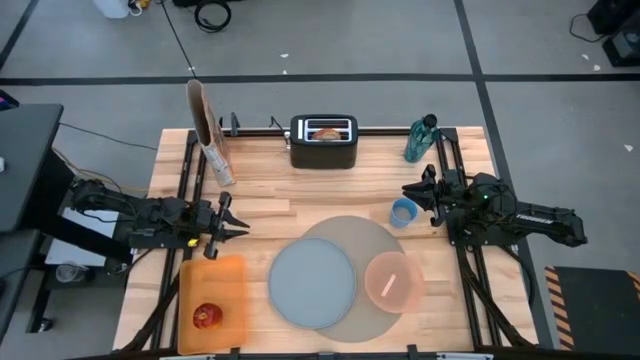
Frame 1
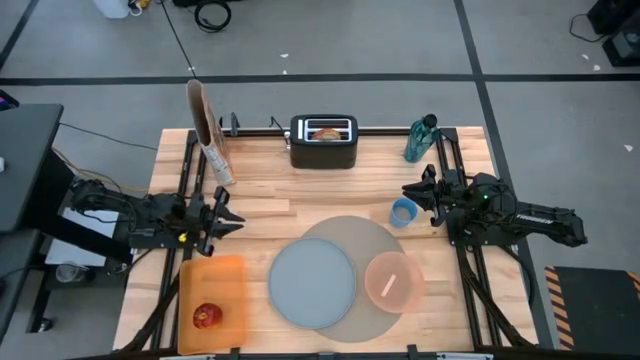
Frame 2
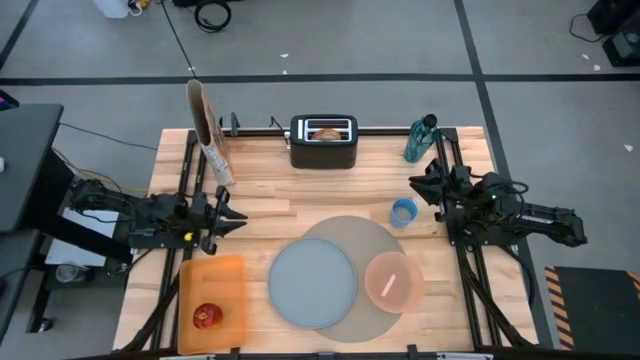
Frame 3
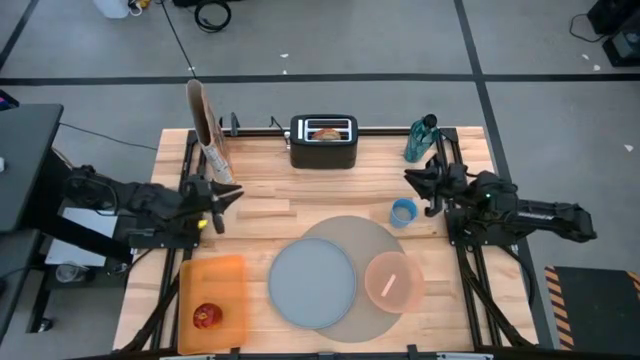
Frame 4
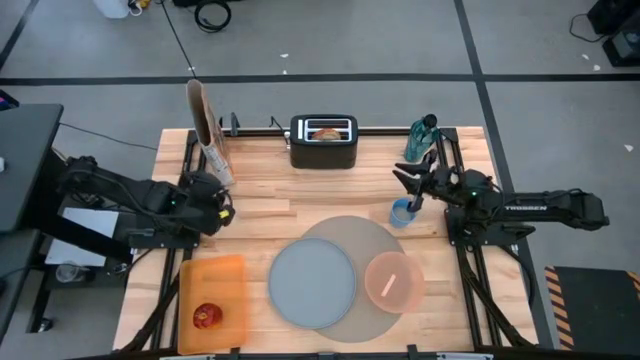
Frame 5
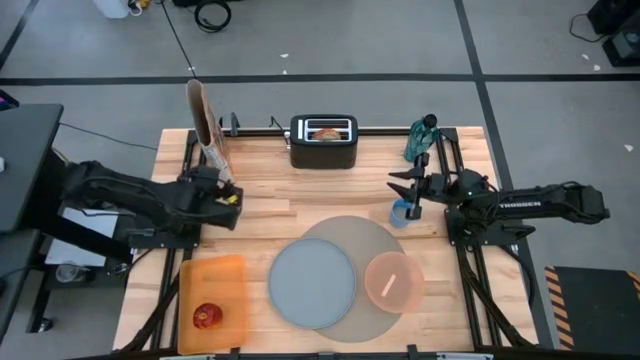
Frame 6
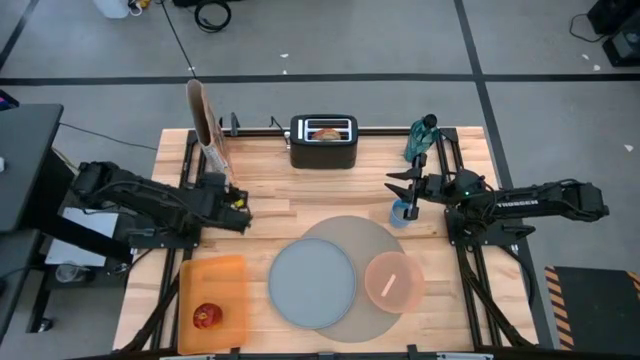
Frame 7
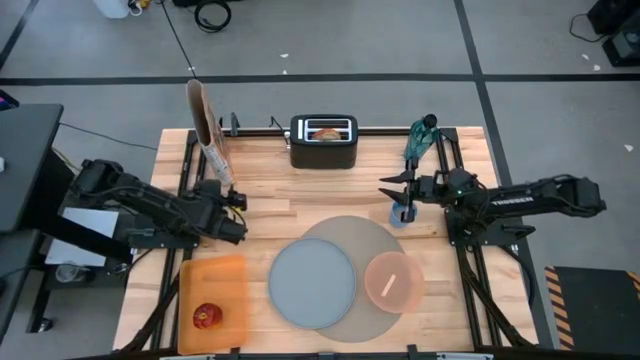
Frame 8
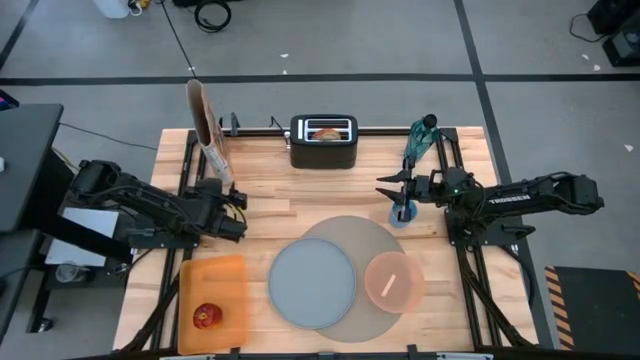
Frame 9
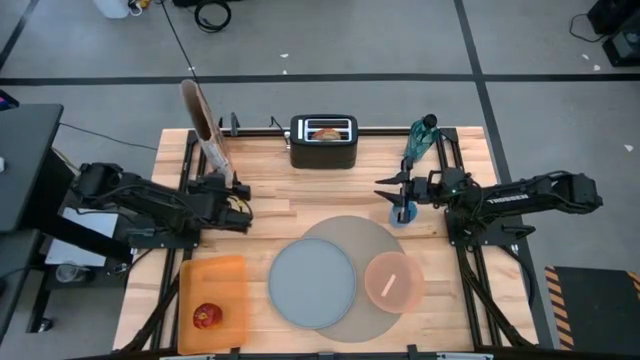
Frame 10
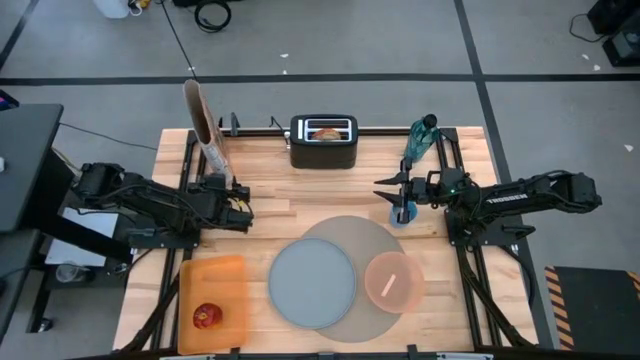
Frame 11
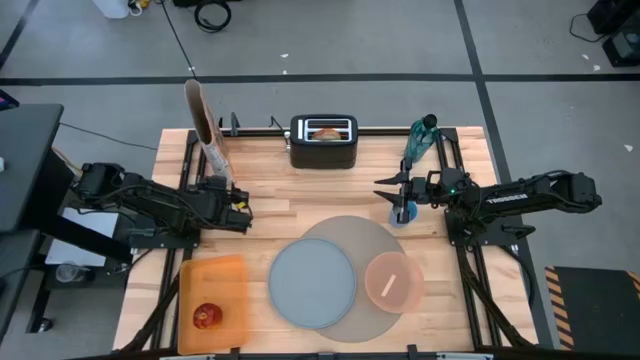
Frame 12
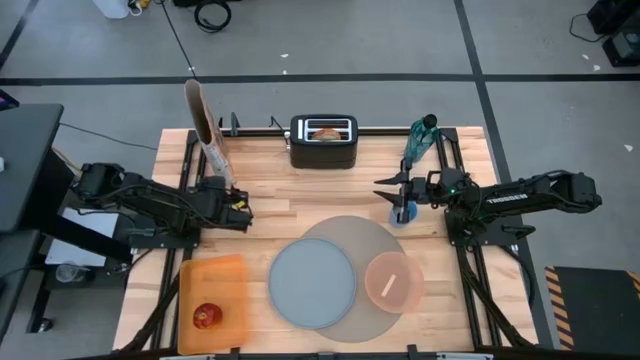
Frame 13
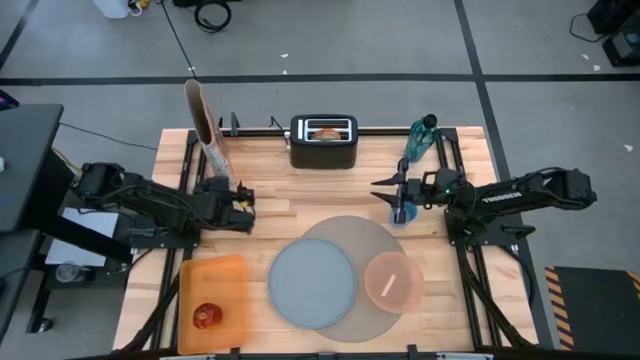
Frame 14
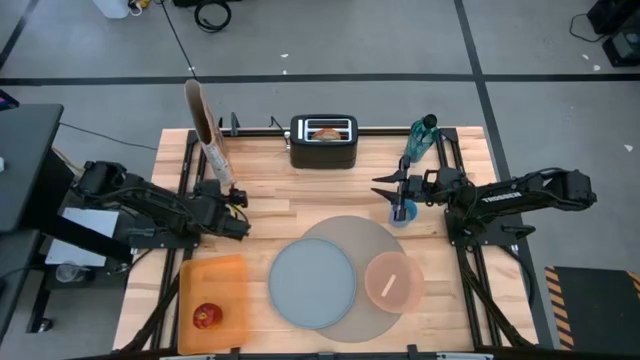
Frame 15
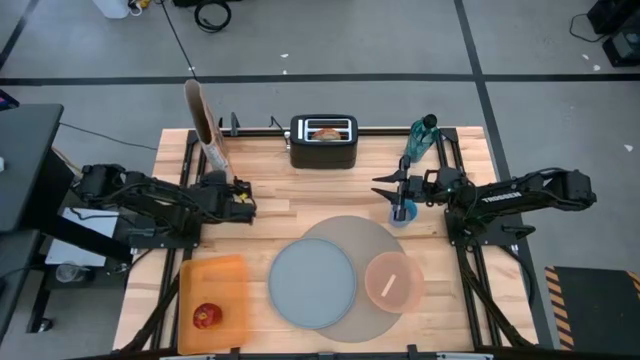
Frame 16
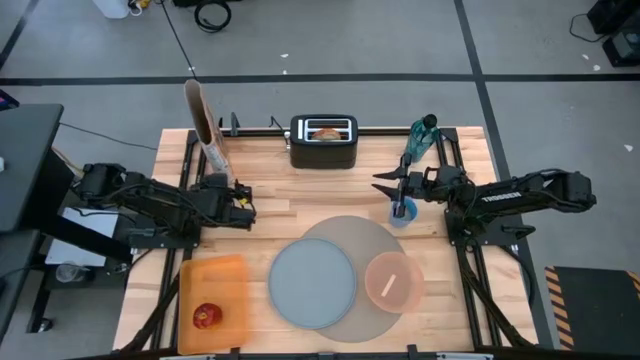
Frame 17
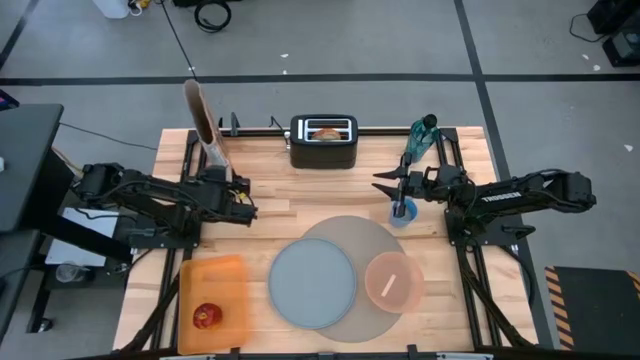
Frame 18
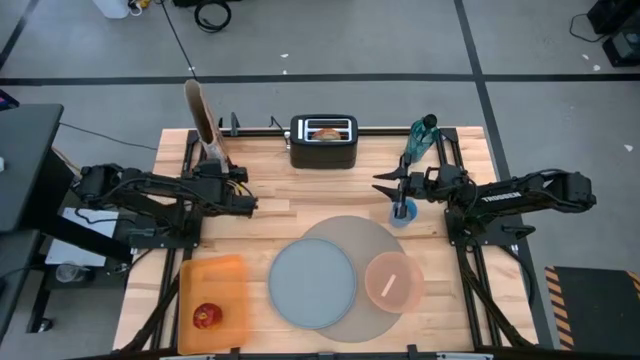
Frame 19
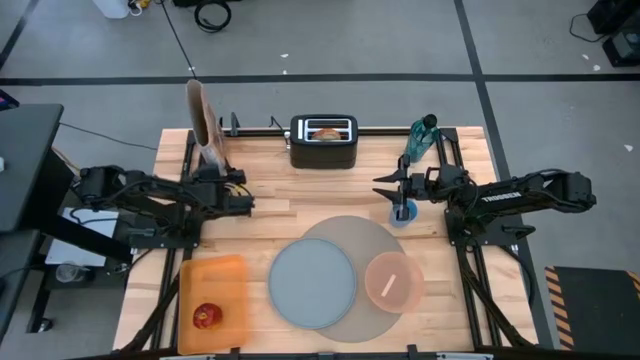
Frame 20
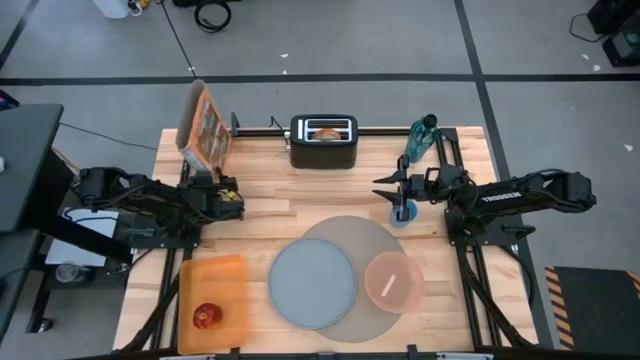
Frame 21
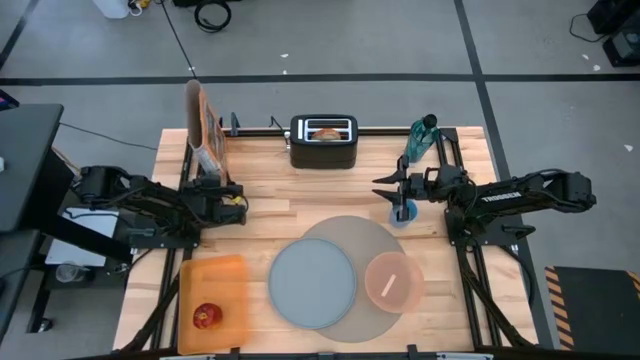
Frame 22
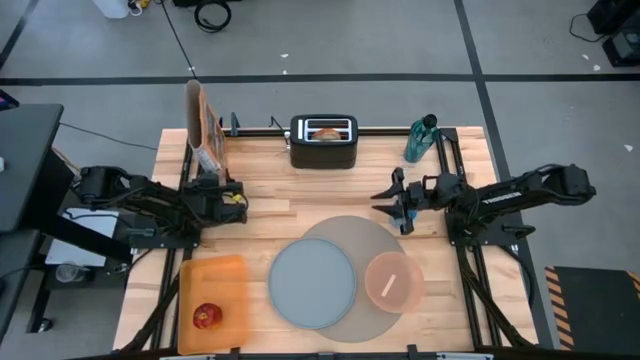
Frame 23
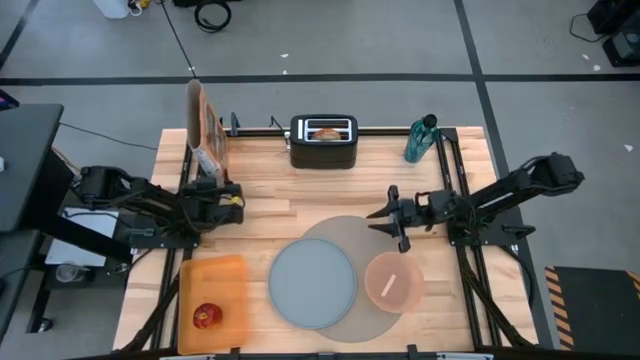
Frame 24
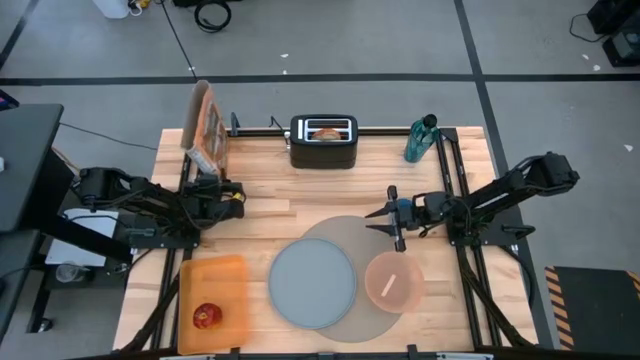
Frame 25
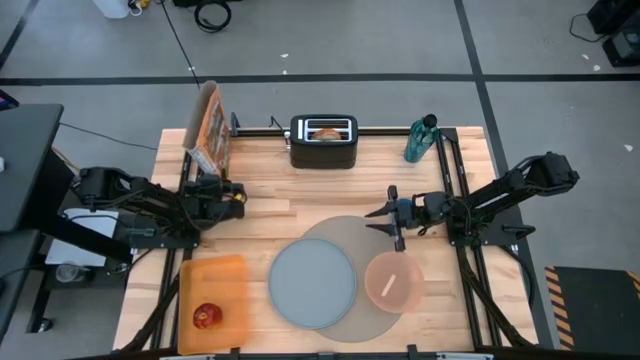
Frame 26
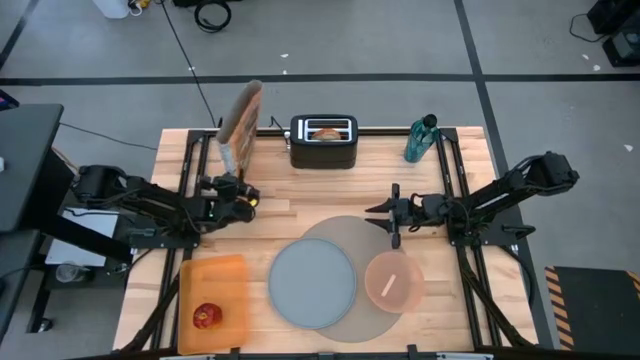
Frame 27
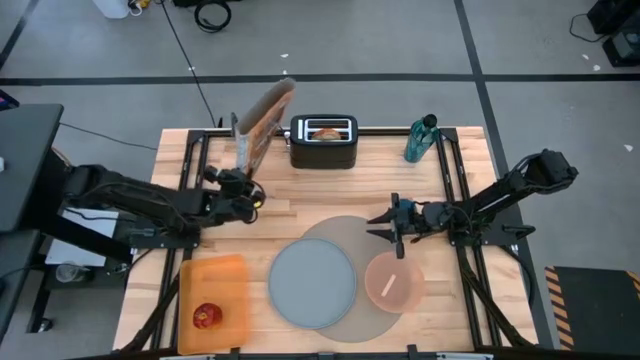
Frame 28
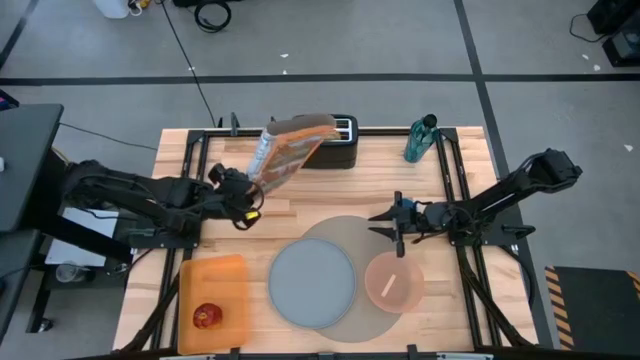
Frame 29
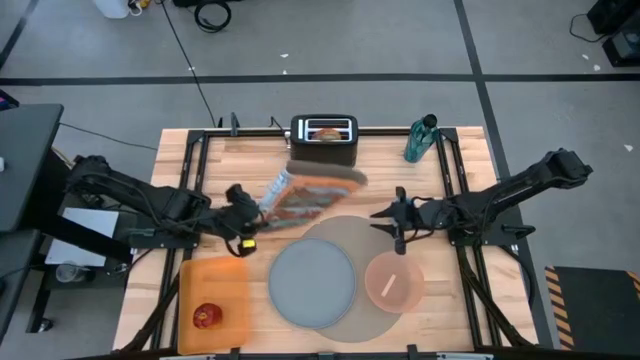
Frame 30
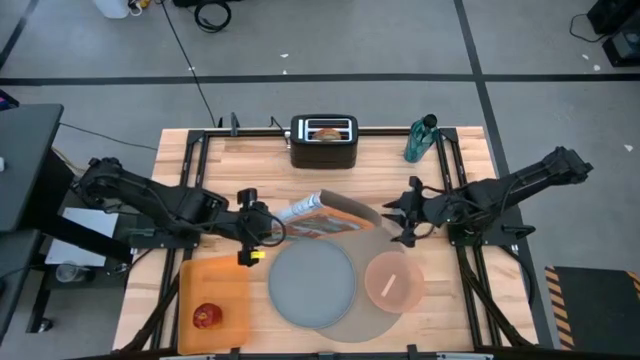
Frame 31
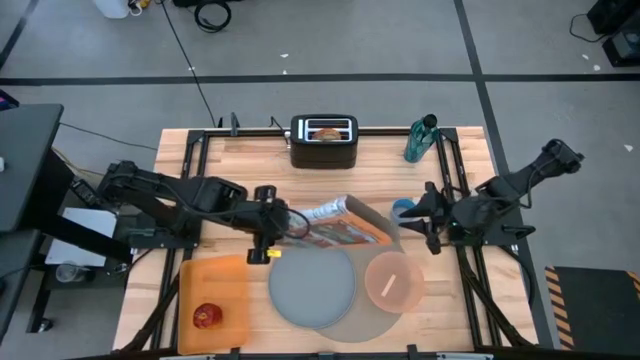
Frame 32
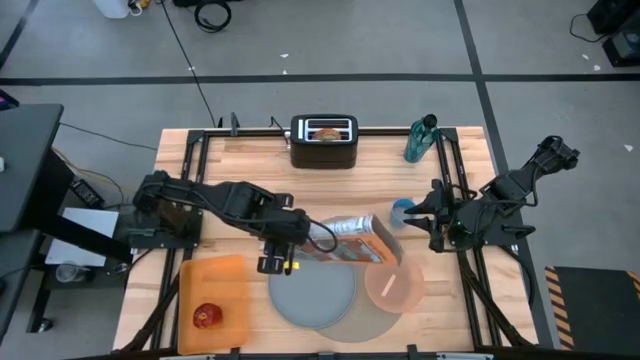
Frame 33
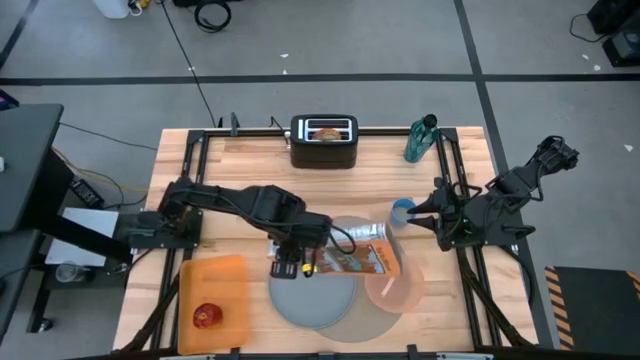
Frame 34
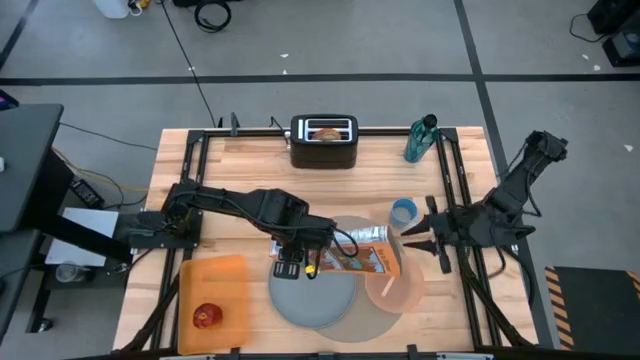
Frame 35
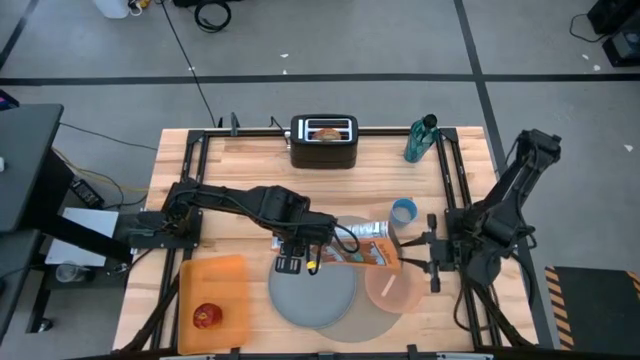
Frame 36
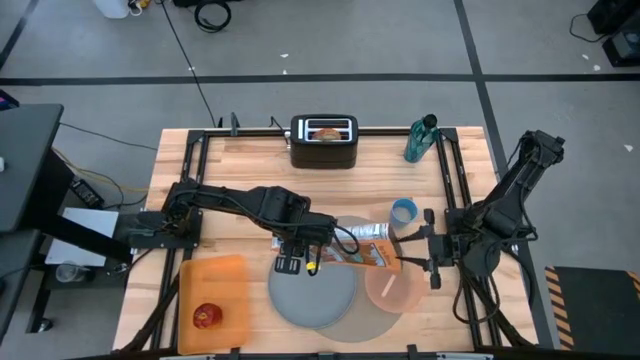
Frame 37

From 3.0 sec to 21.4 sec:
Task: Arrange a breakfast setting
Pour cereal into the orange bowl
